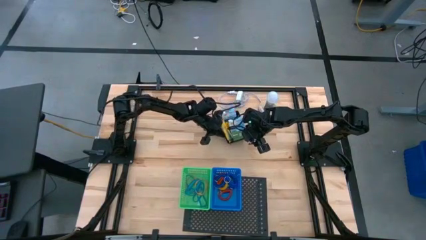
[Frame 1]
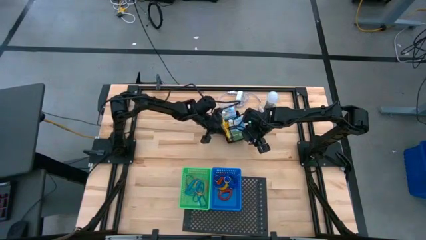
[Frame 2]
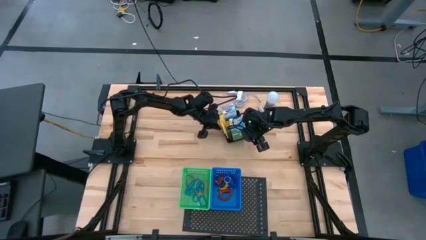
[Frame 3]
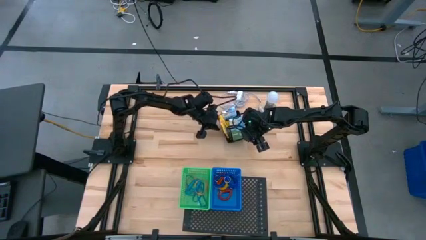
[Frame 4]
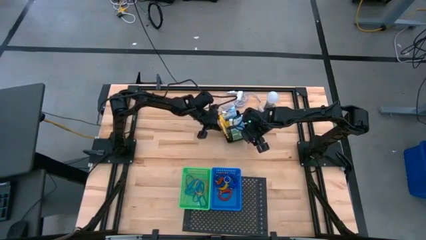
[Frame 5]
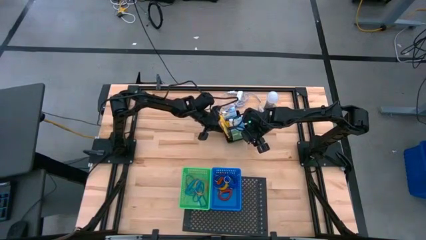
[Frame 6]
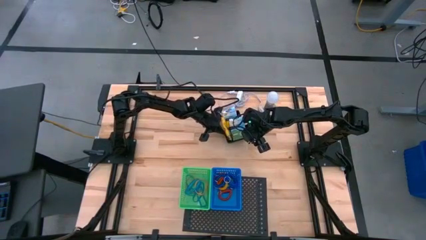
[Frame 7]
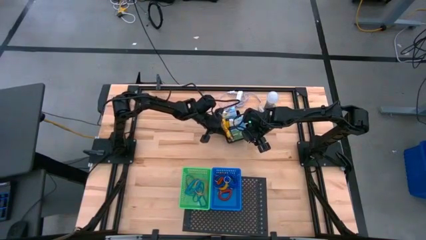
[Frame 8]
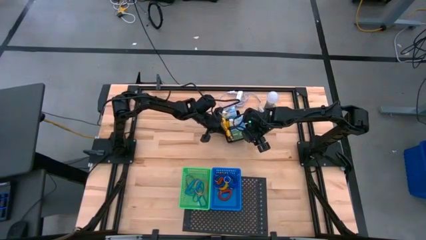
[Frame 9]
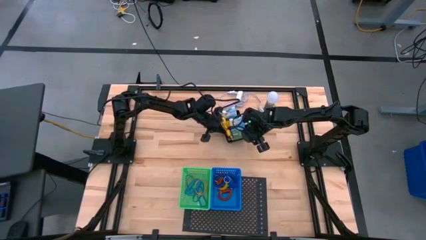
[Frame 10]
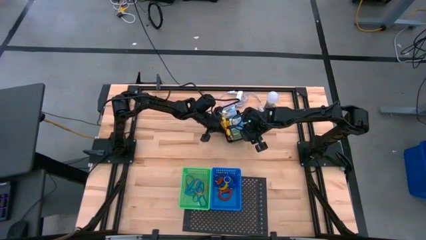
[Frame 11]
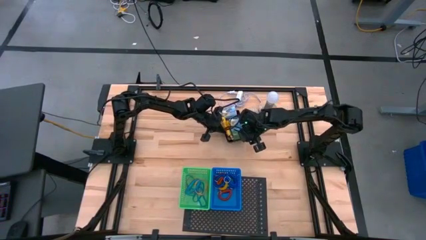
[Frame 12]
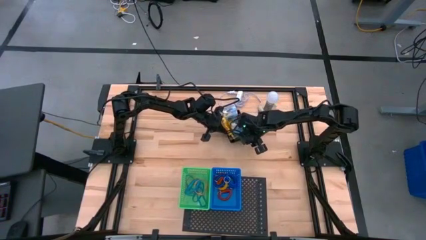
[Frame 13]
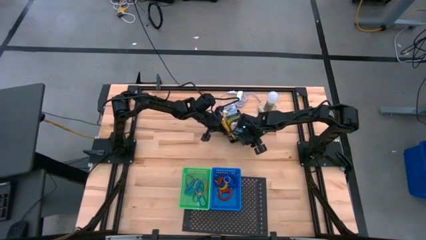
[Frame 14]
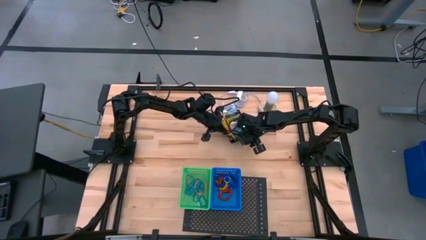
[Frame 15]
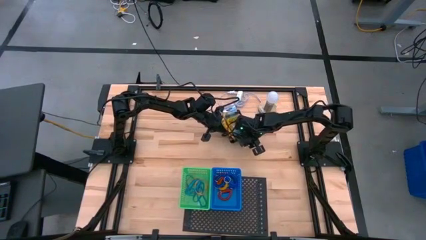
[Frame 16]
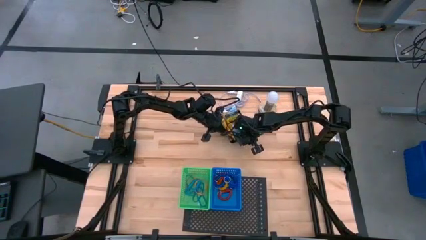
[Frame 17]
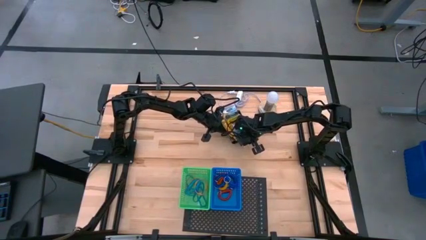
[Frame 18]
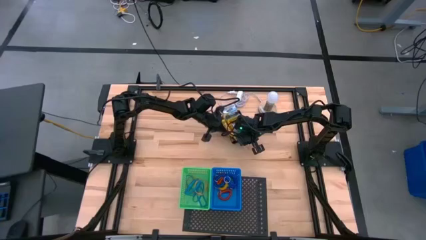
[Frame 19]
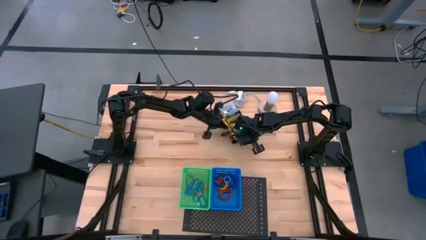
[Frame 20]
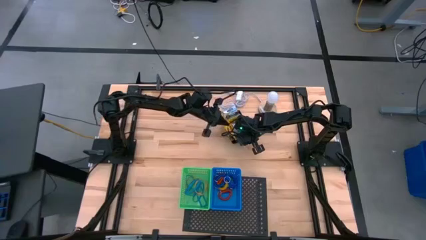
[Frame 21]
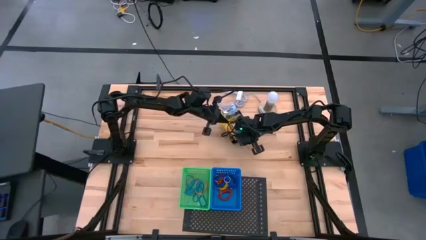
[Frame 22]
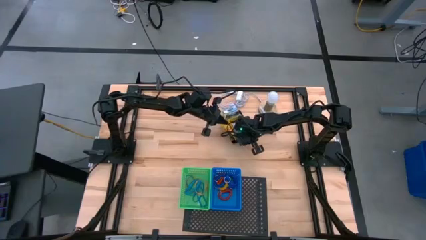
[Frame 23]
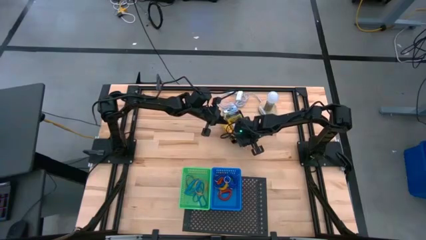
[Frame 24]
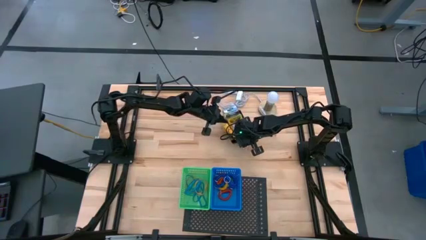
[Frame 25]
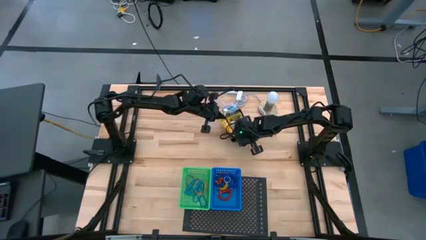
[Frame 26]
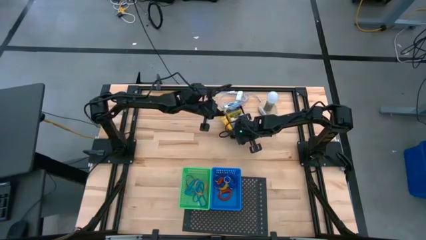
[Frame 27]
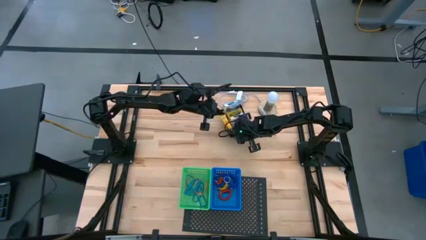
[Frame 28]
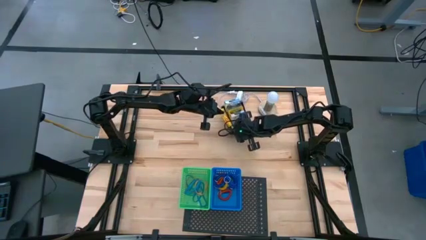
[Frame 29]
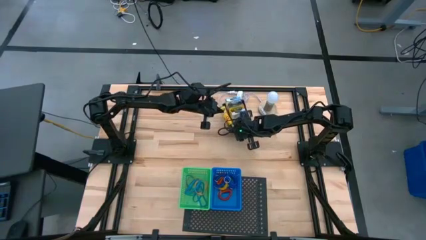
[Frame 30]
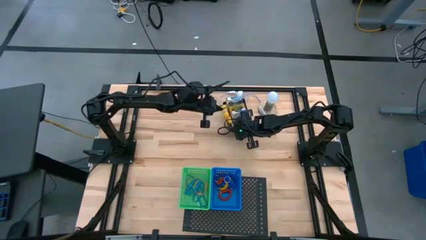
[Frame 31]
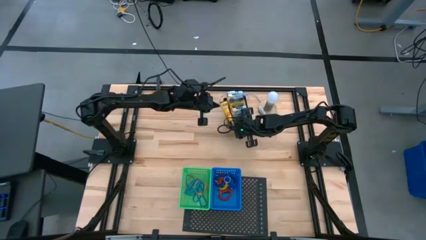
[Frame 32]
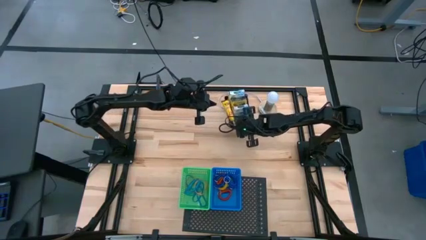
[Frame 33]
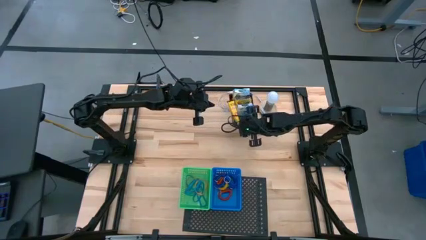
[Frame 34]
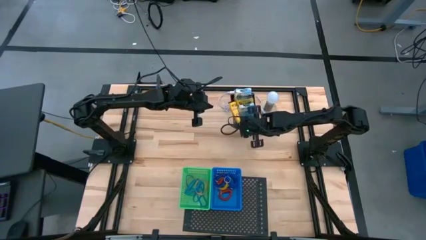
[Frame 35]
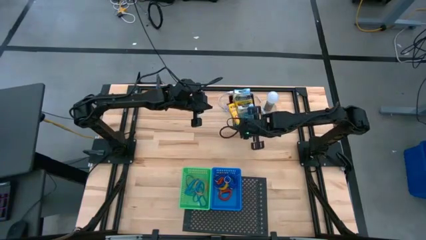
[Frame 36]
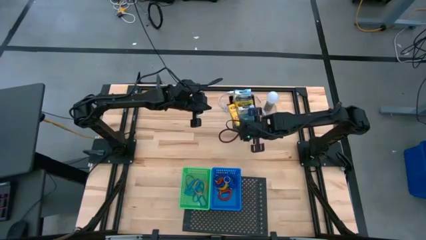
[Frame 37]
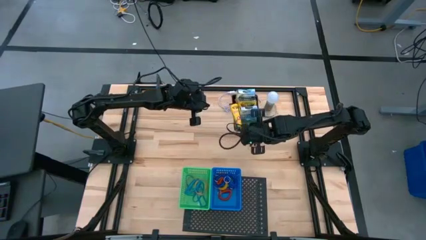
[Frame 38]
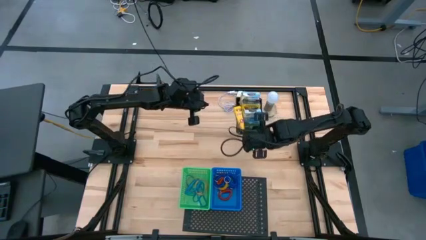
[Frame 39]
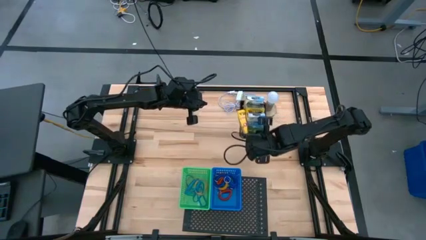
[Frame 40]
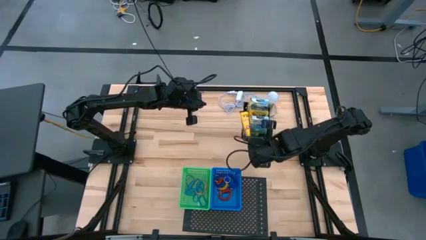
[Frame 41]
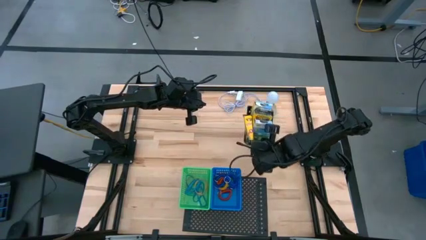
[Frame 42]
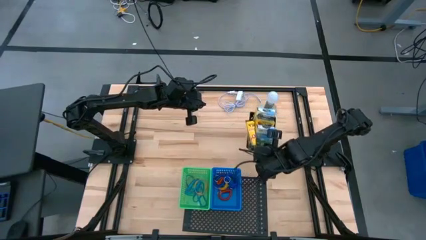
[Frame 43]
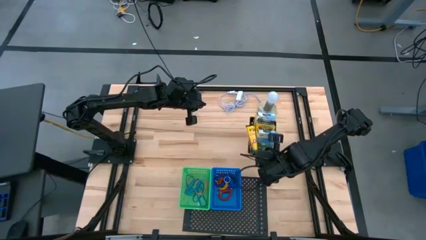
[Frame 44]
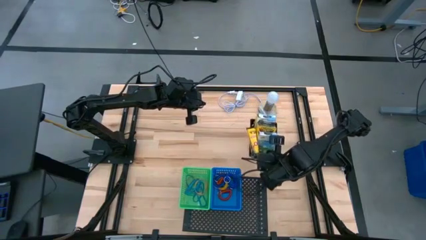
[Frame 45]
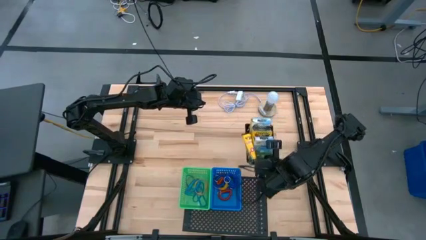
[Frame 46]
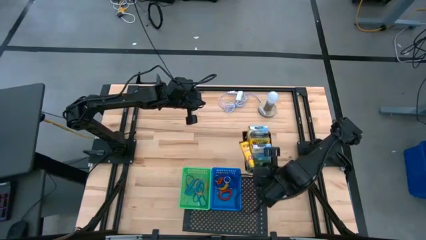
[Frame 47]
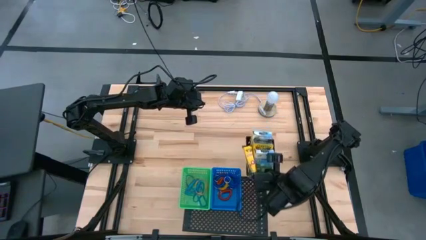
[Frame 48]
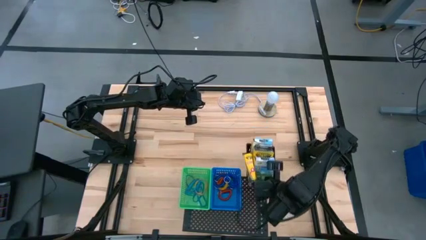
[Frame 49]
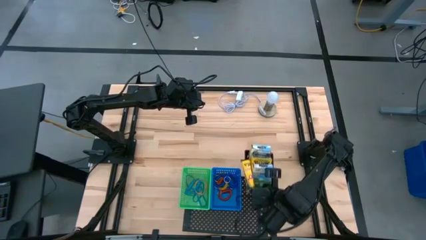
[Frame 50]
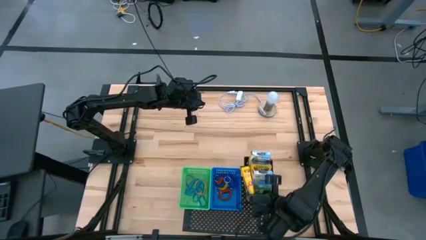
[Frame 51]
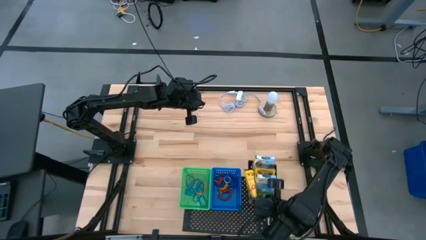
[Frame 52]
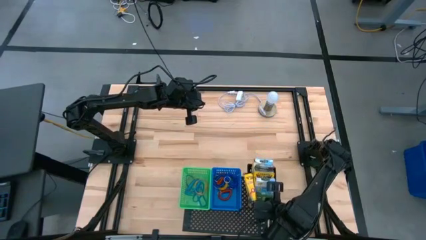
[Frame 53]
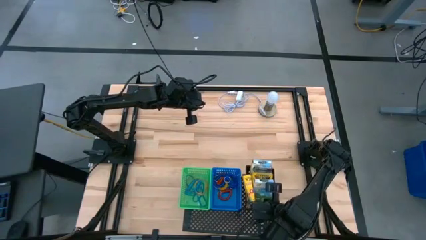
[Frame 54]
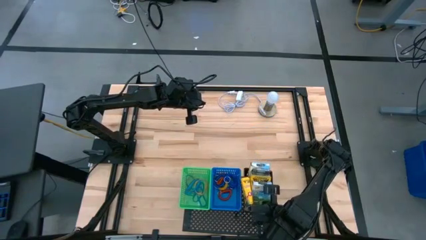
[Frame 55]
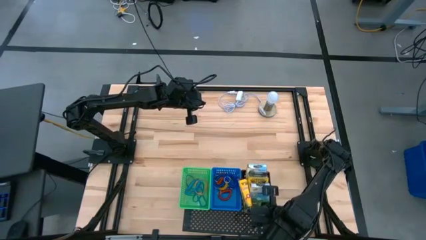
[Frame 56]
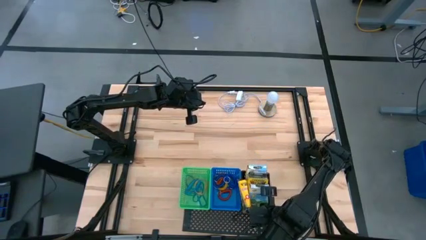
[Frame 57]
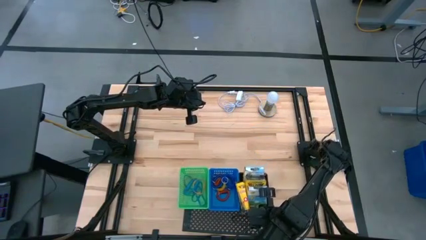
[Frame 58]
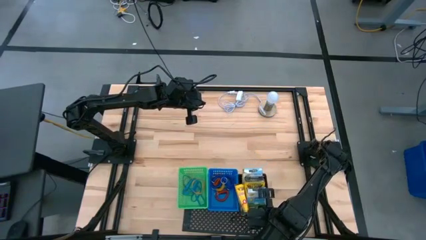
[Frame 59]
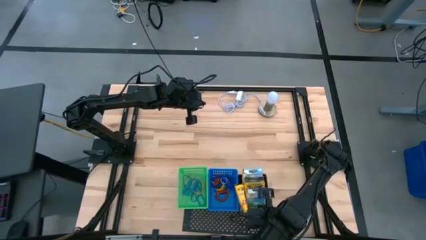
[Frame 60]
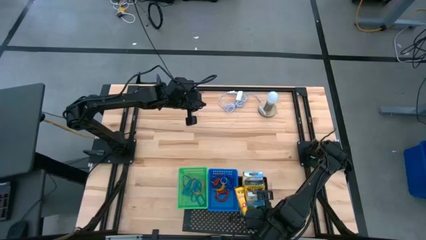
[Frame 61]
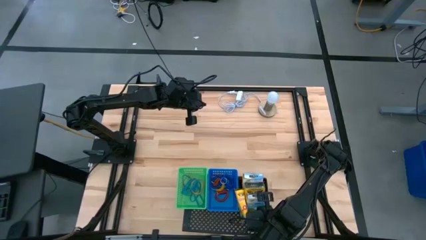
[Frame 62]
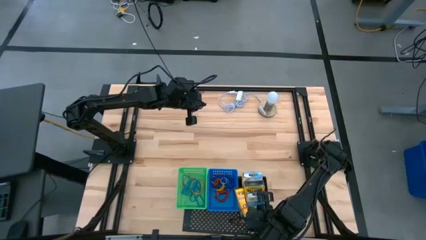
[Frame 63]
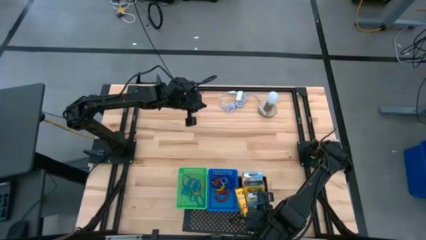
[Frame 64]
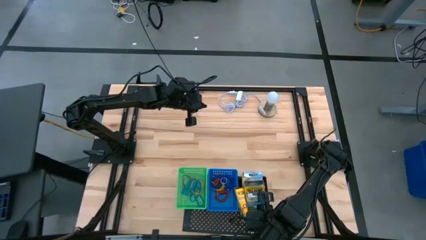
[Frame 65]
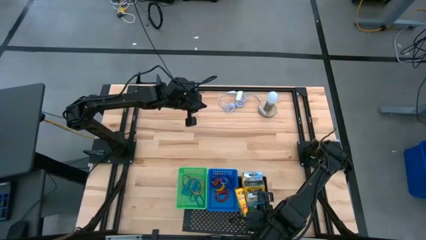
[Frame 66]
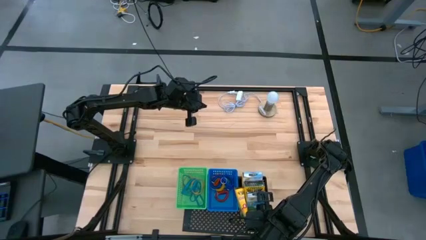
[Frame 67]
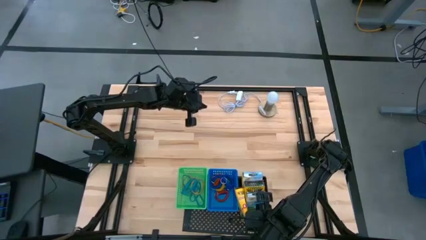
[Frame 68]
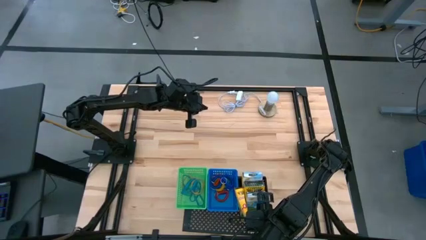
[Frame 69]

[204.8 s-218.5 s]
Task: Pick & Place Office Desk Supplies
Put the black bin on the shelf
